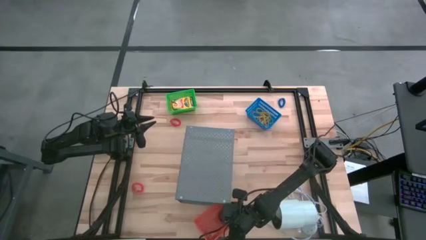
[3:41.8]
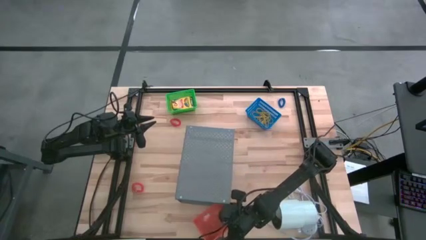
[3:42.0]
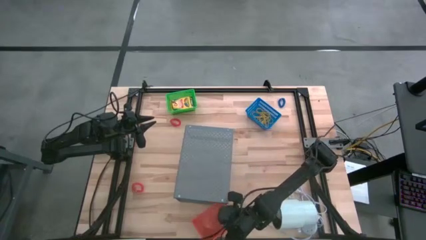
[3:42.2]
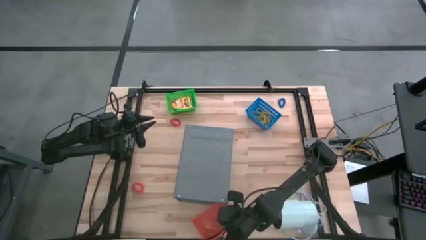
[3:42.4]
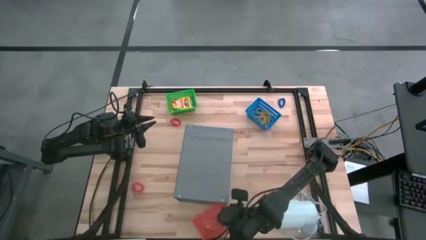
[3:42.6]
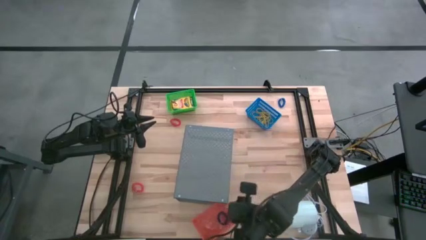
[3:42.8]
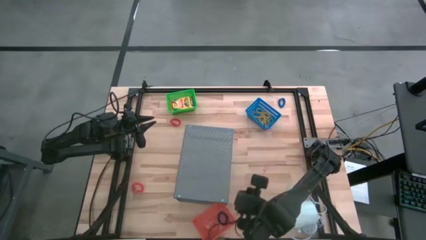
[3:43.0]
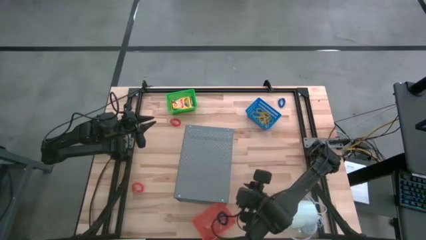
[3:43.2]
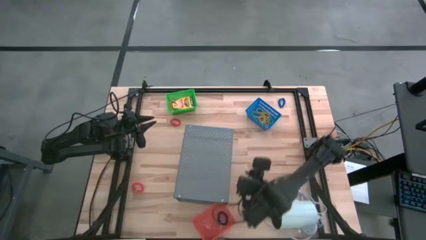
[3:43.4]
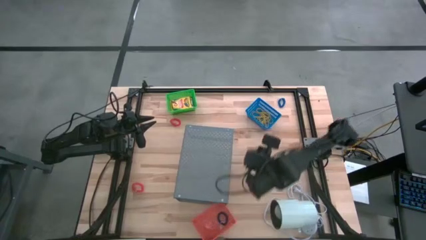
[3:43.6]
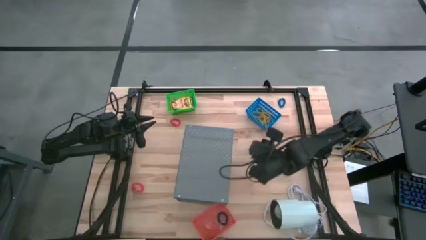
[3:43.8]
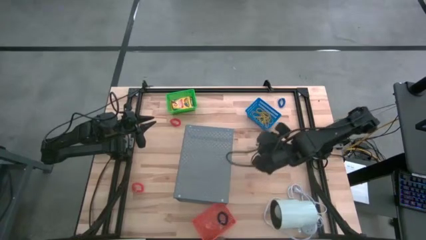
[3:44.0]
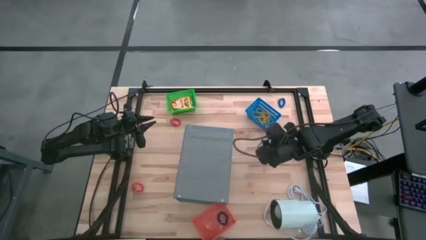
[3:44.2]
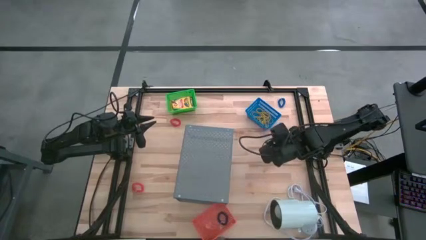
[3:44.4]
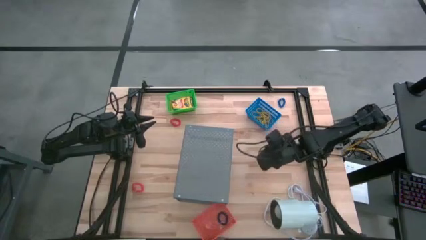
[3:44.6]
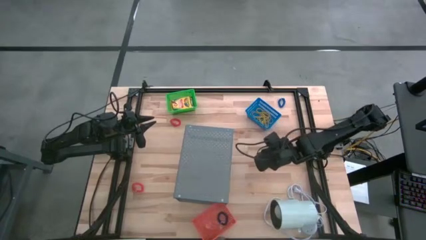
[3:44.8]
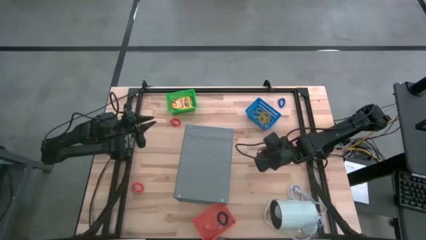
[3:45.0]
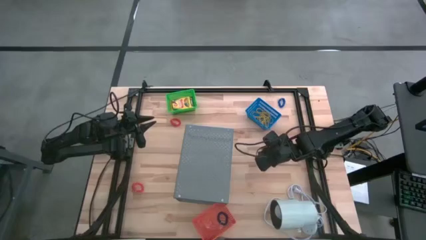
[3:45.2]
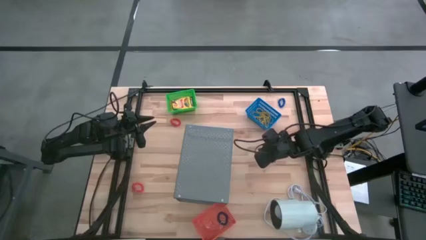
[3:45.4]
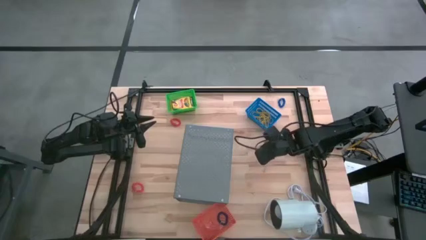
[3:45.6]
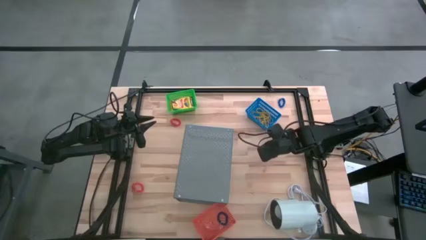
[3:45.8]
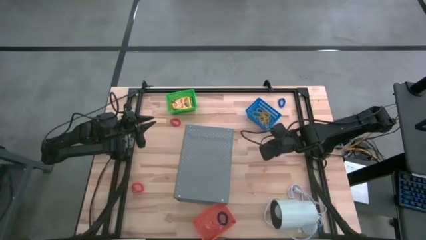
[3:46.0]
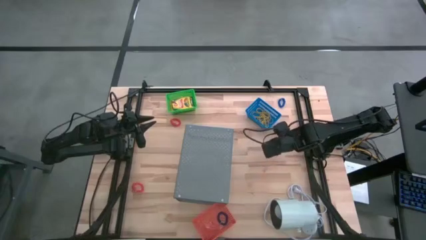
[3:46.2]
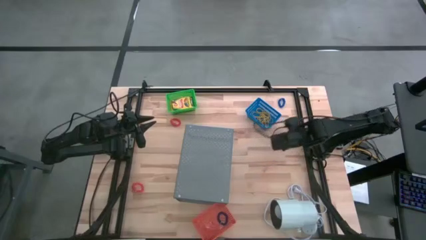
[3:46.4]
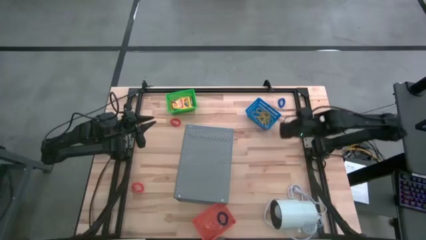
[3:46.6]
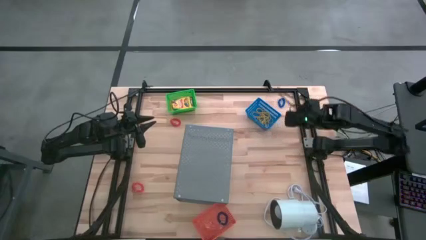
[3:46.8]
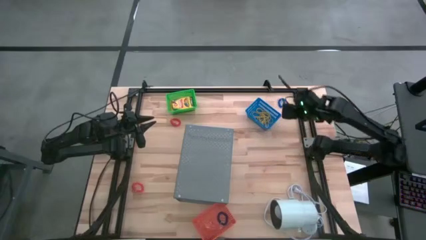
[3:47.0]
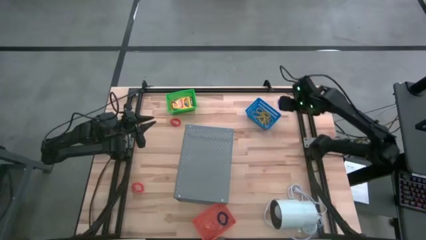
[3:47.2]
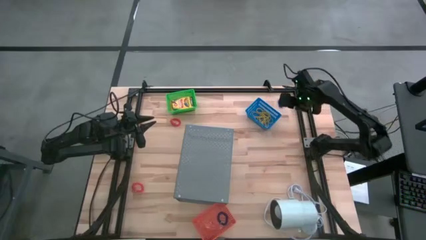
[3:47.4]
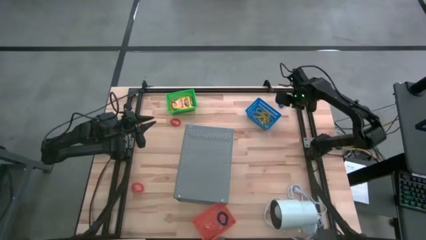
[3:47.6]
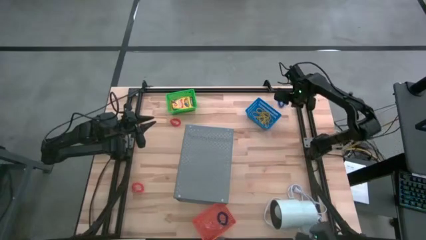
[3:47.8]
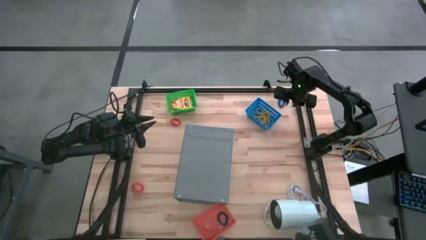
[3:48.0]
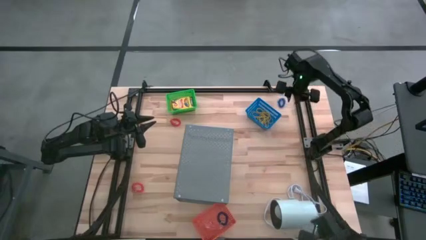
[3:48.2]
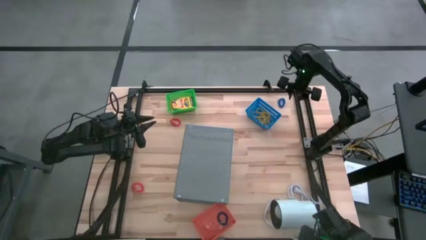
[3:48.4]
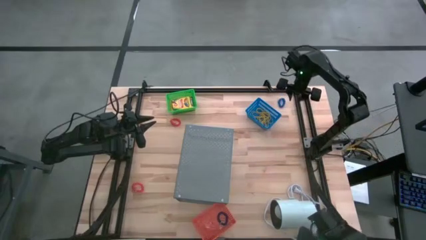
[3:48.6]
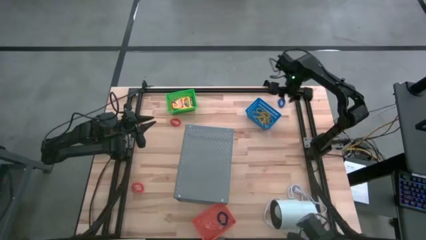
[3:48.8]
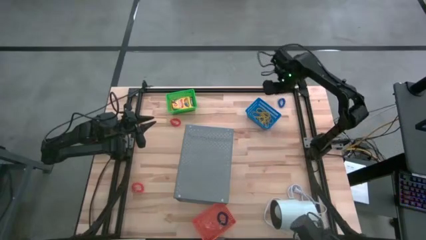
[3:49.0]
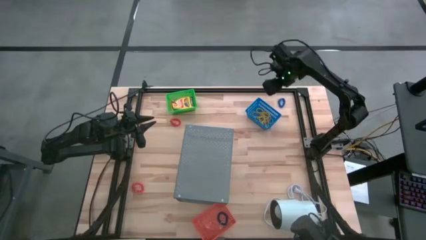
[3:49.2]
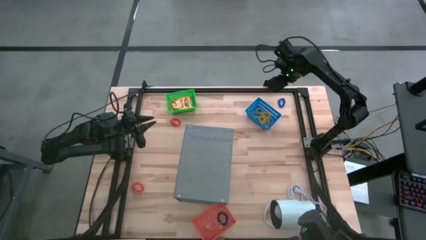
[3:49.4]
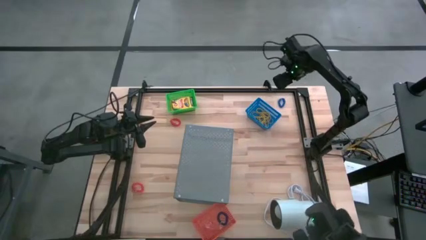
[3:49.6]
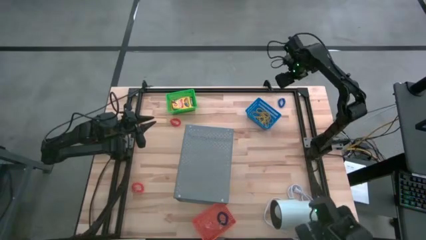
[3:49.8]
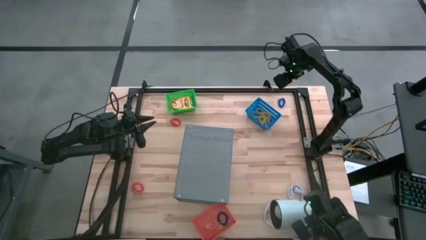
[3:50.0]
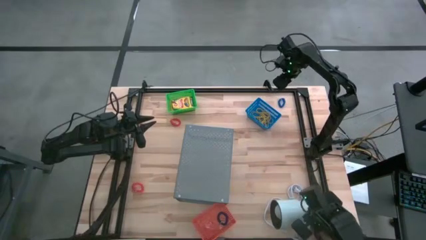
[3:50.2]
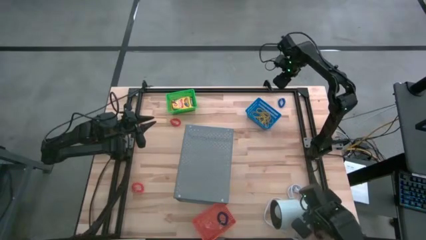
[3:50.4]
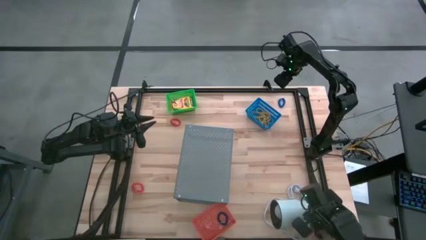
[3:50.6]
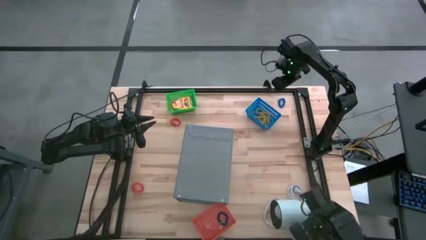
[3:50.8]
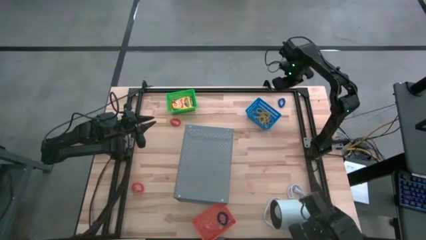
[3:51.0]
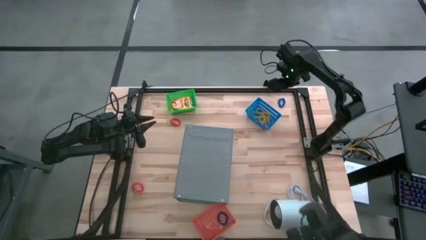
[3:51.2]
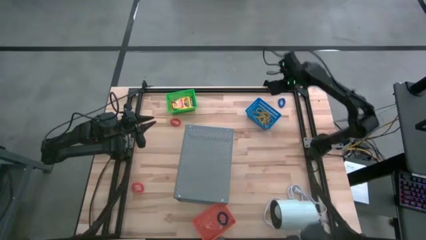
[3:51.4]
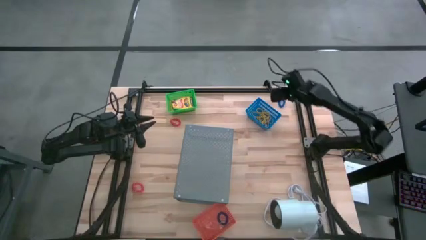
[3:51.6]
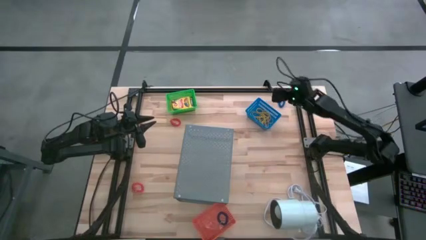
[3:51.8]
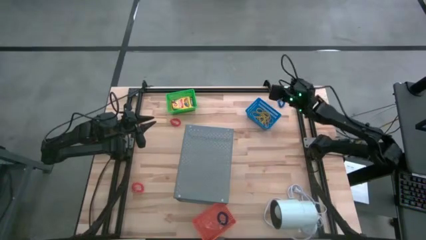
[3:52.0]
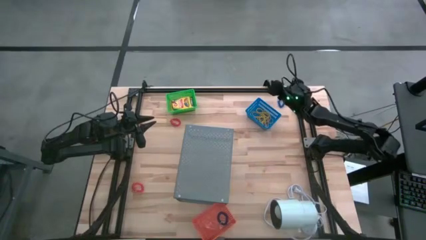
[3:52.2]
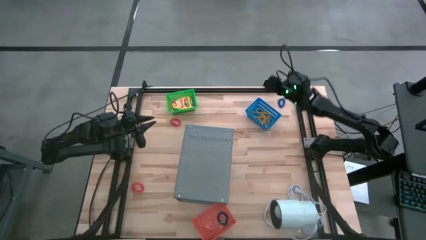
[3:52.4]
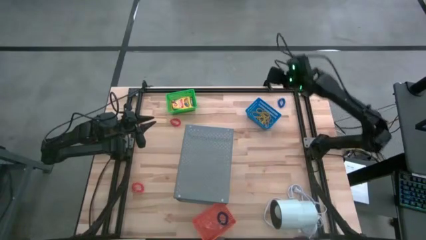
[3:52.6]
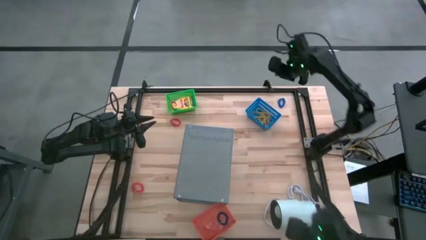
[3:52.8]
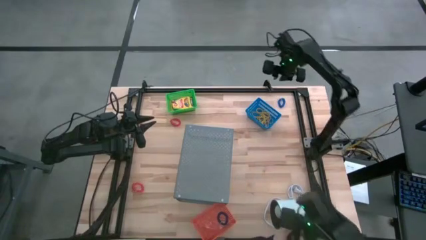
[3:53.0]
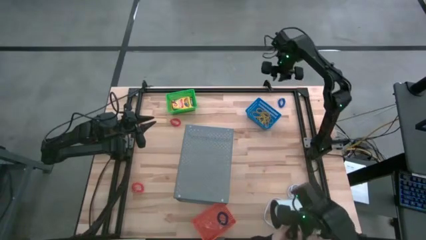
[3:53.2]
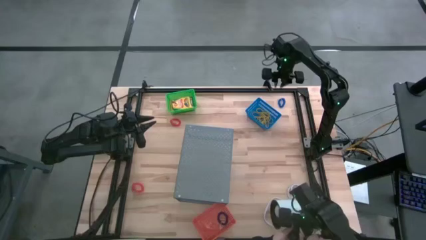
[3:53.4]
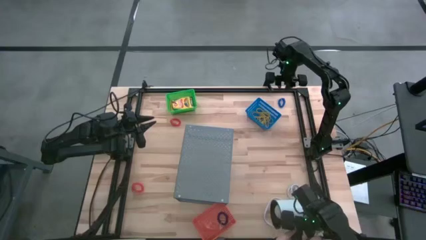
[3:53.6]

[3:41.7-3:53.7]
Task: Pick & Place Office Desk Supplies
Adjust the blue basket on the table

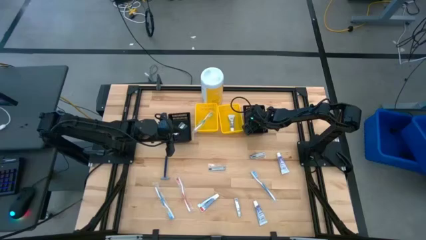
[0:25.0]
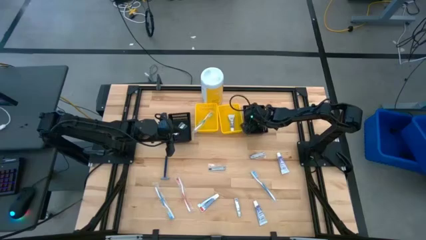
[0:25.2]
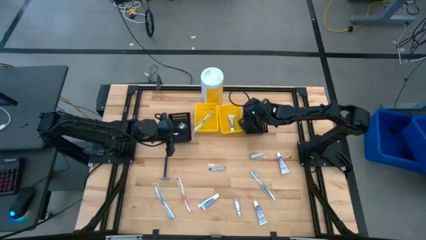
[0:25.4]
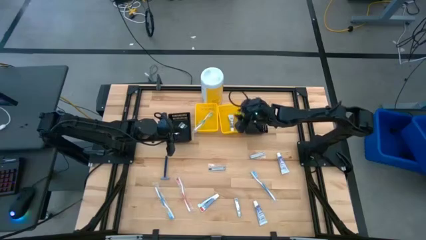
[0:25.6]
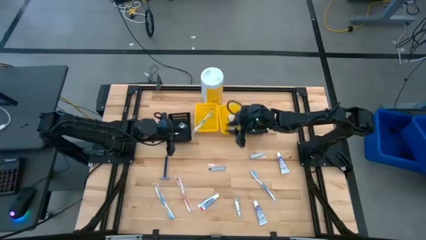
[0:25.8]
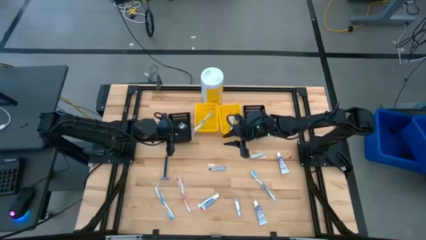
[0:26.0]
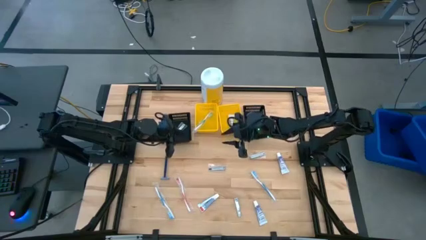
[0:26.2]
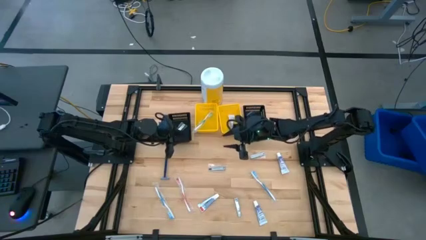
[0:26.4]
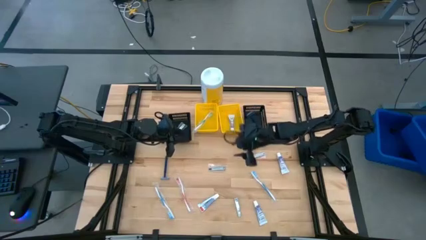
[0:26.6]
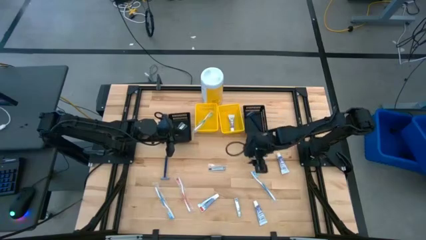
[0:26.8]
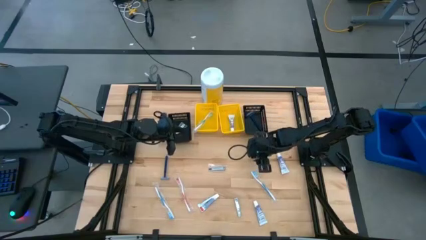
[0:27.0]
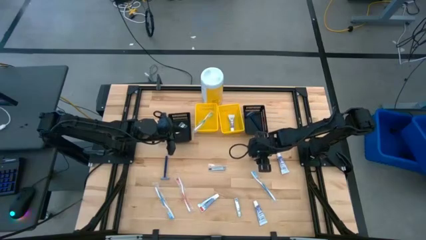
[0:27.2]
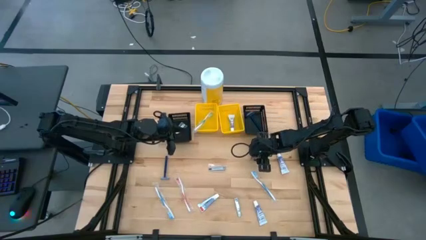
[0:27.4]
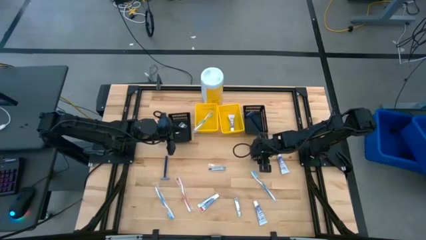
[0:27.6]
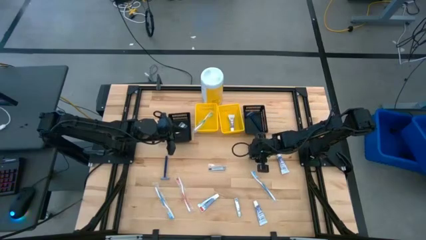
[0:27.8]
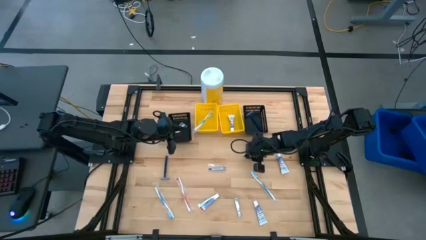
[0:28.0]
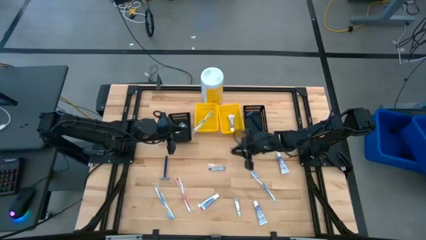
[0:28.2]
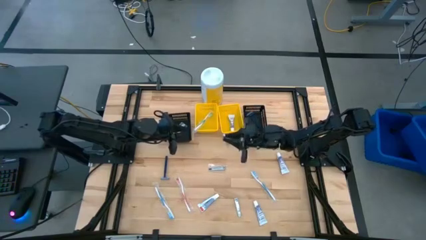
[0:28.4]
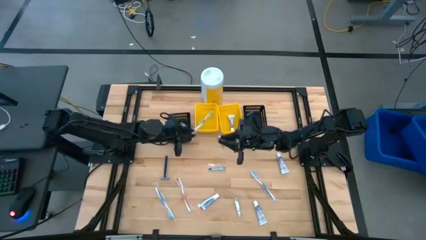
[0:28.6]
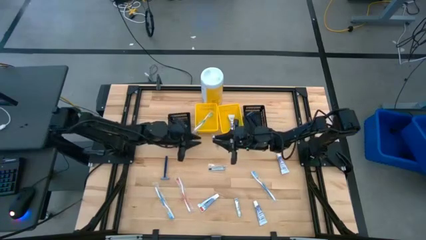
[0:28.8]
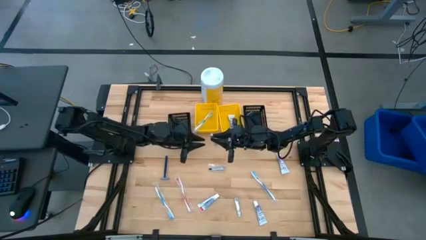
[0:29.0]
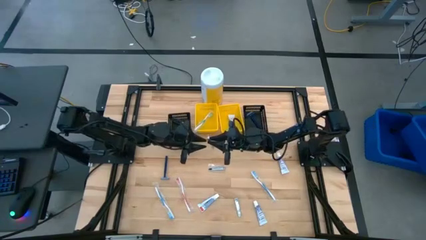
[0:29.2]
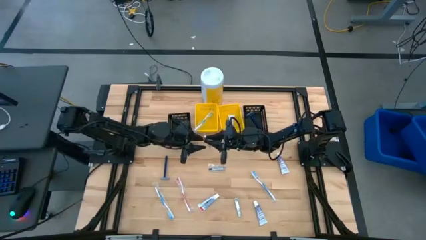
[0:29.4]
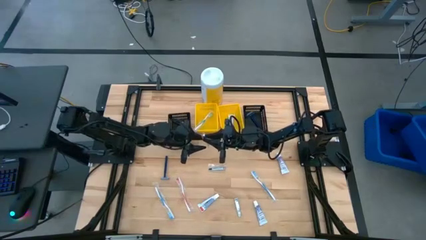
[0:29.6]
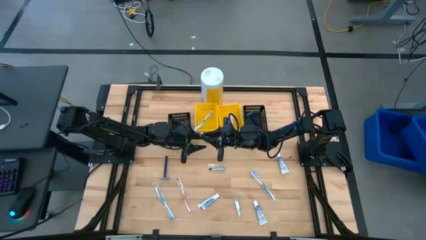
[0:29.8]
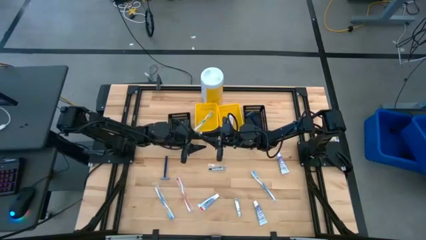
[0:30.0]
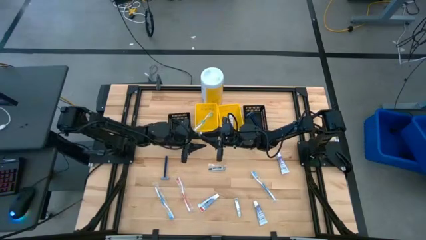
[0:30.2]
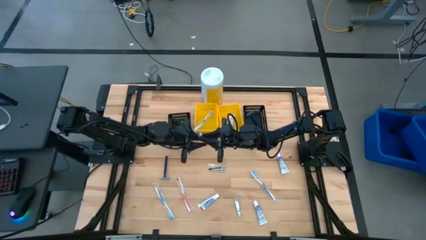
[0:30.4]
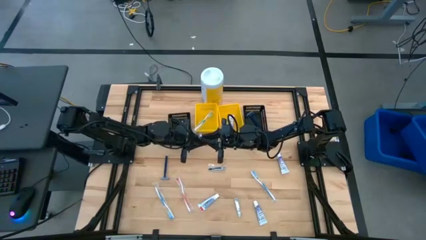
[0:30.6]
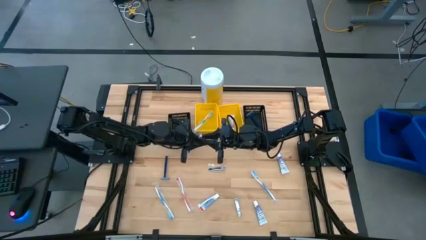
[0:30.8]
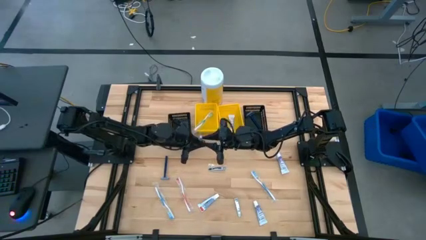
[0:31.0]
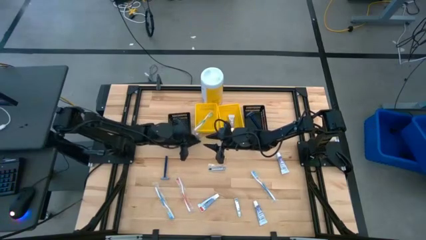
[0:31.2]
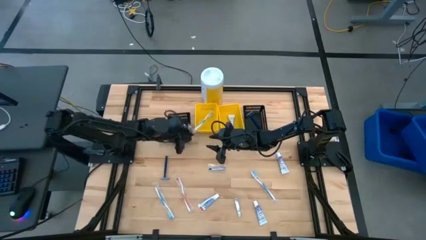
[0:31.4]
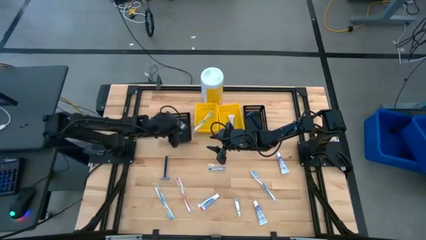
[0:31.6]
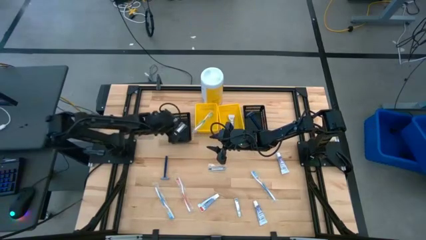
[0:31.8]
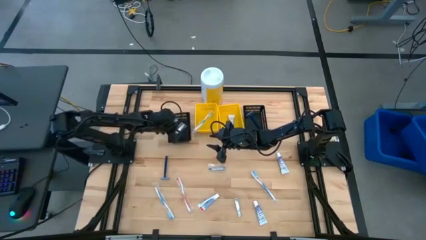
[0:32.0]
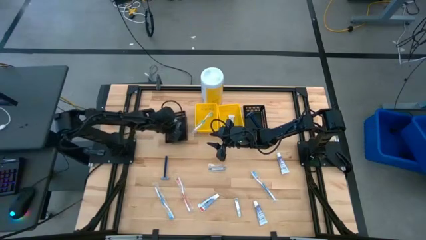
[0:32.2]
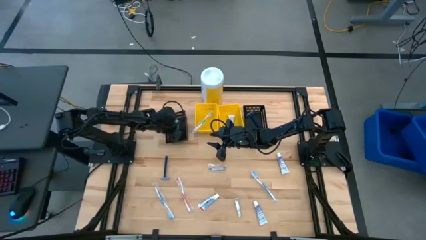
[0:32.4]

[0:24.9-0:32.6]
Task: Pick & Place Travel size toiletries
Put the silver nail cutter into the left black bin
